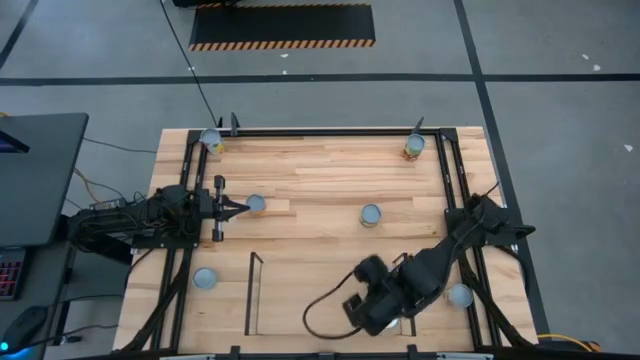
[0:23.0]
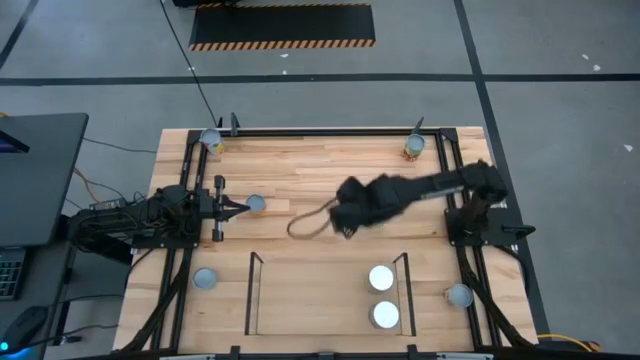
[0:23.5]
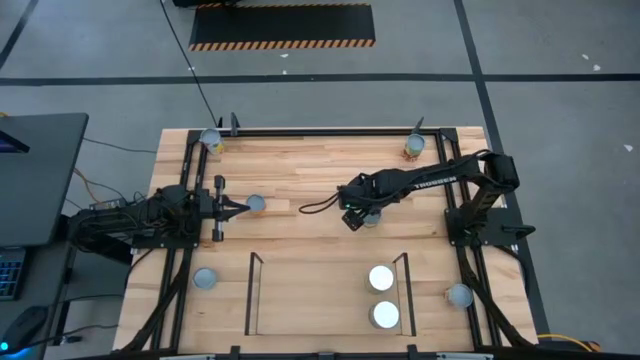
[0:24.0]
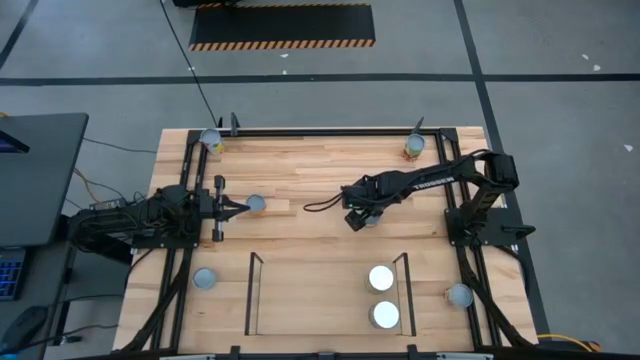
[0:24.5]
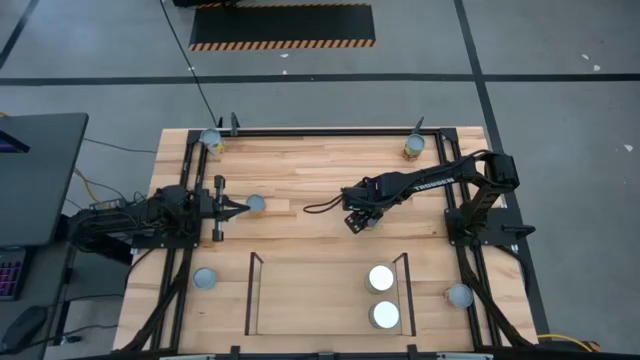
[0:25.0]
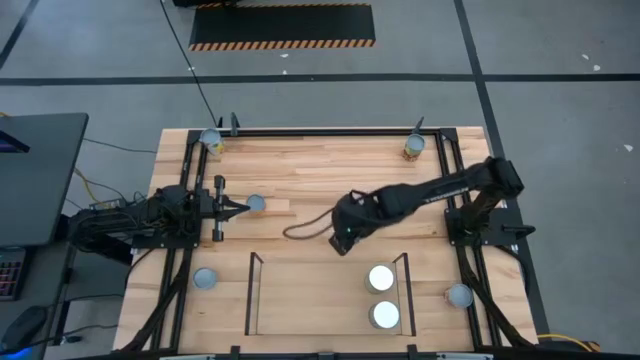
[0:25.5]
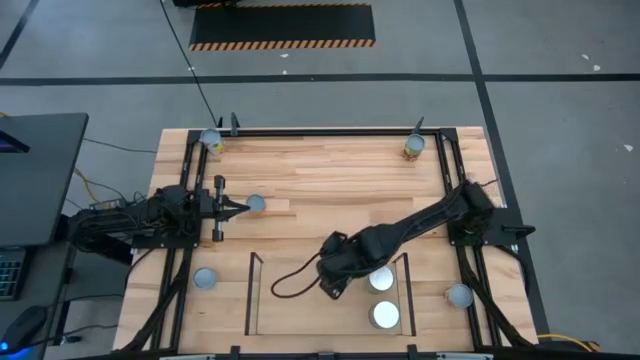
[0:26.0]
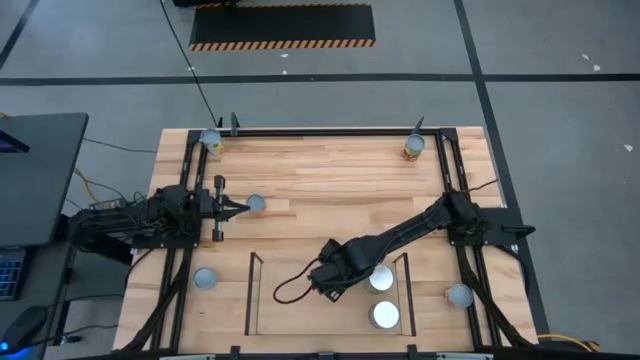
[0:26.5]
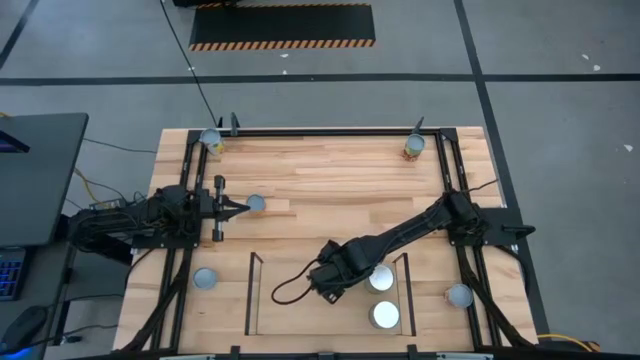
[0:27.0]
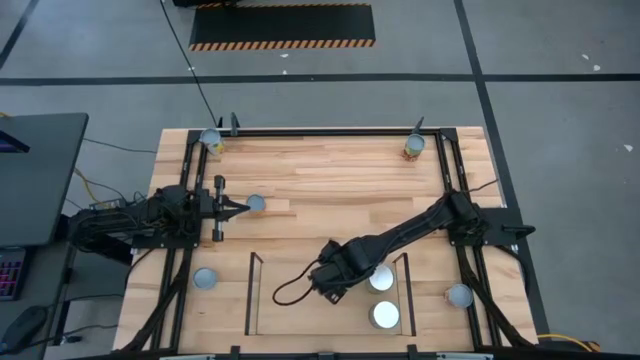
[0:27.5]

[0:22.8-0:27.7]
Task: Pick and place cans onto a shelf
Put the canned peaches on the shelf

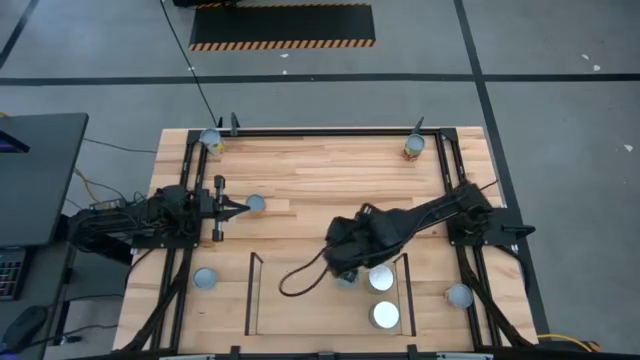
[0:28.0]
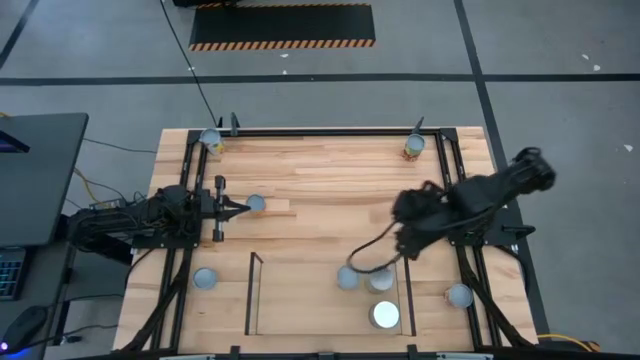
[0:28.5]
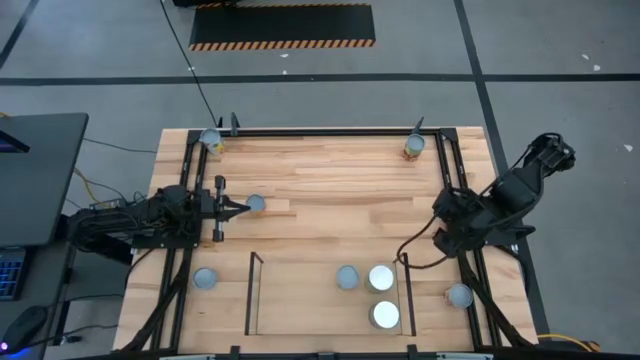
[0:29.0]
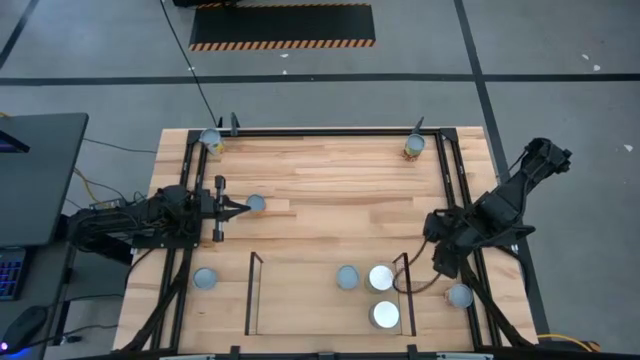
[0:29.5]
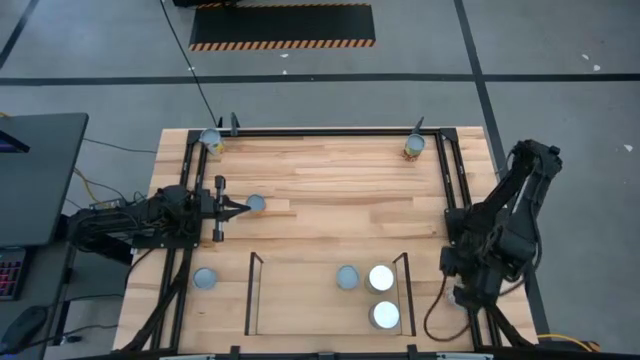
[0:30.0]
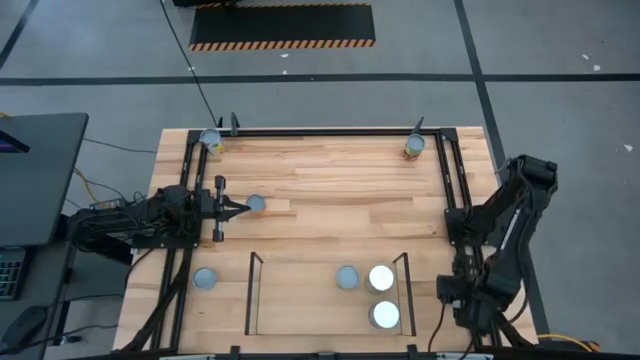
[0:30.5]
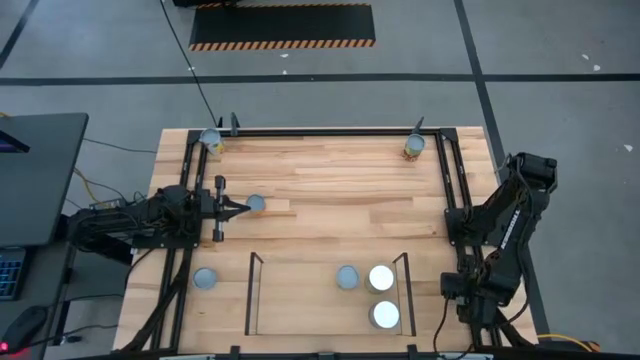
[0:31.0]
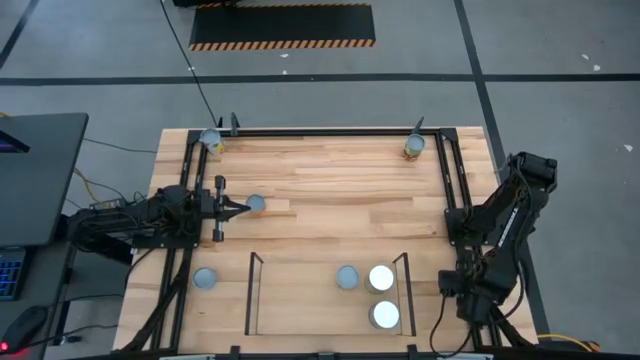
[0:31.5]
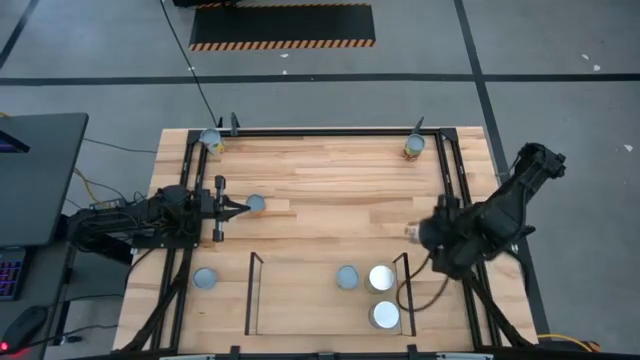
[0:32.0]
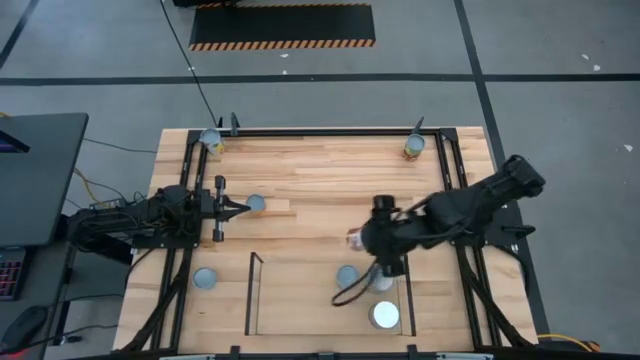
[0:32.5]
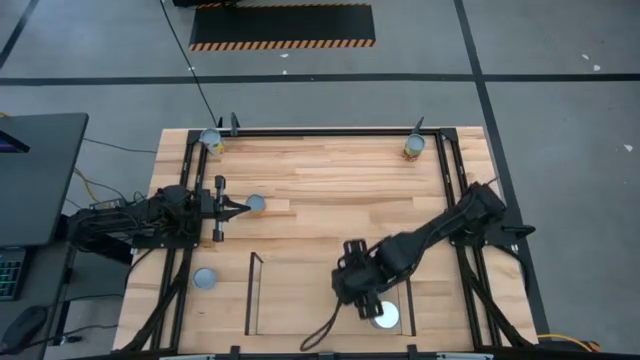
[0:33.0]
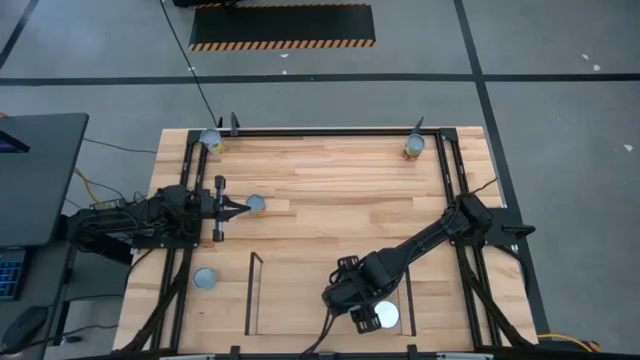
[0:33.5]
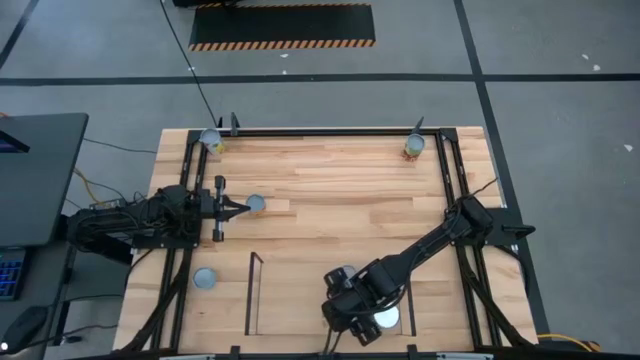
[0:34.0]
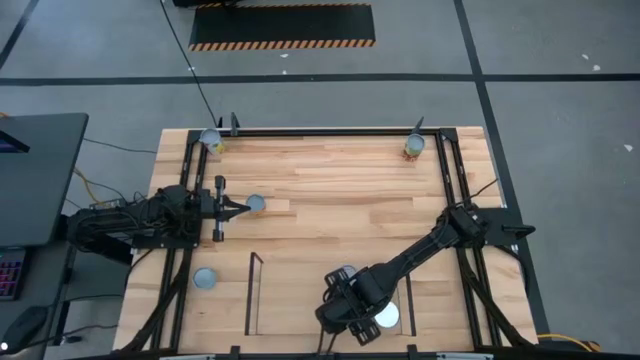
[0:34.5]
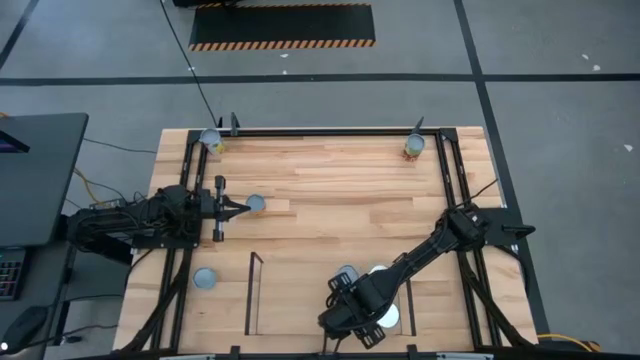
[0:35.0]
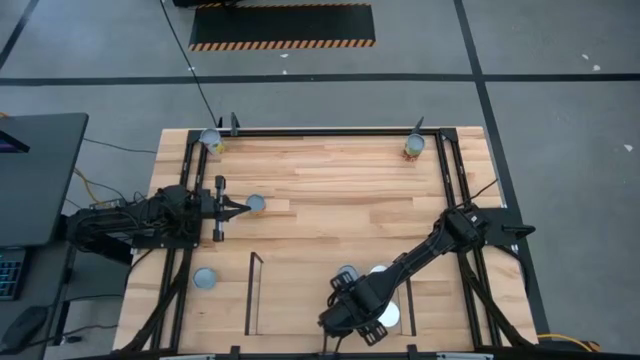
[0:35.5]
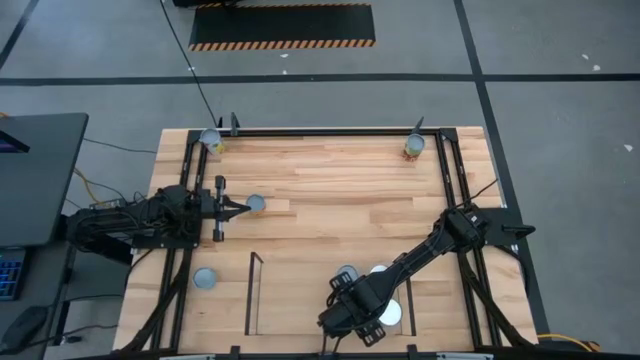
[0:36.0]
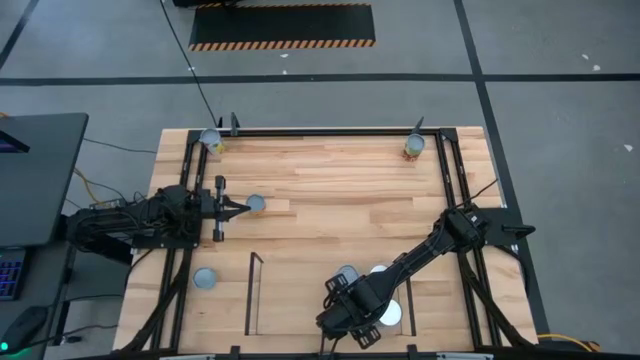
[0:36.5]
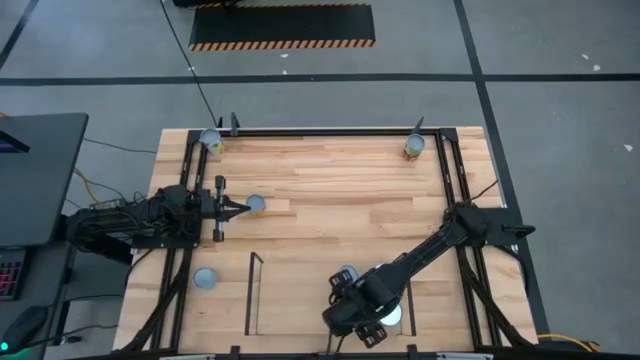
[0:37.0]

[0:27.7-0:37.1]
Put the canned tomatoes on the shelf

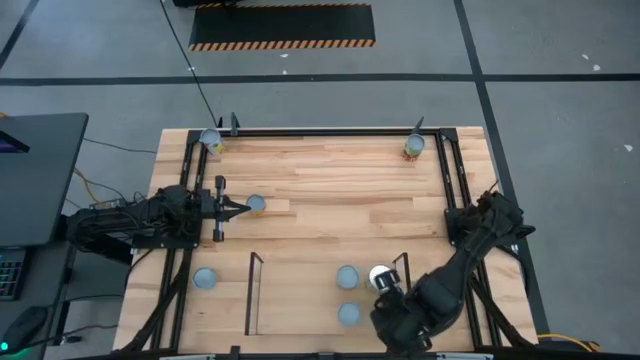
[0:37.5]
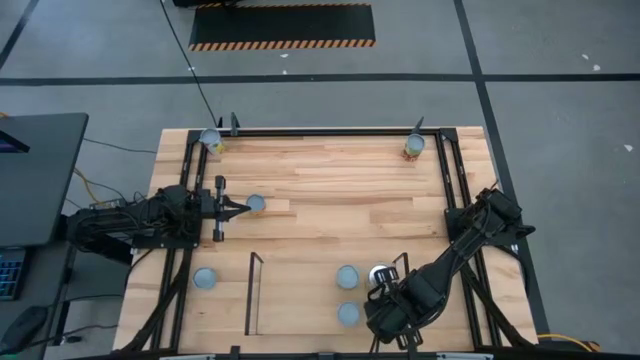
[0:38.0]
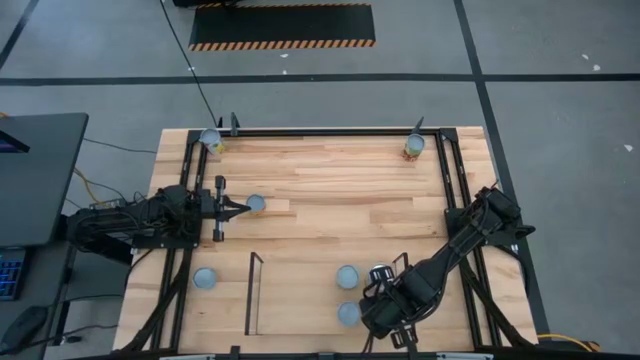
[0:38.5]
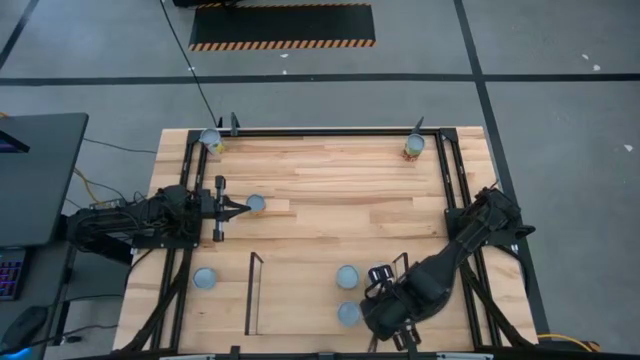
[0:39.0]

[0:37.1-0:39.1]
Adjust the canned peas on the shelf

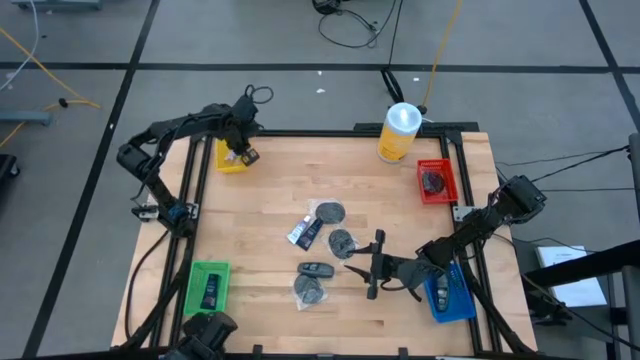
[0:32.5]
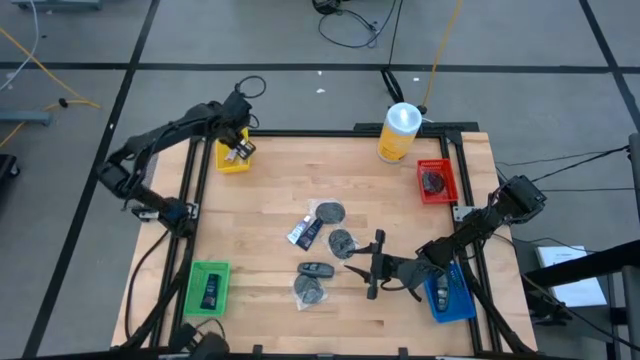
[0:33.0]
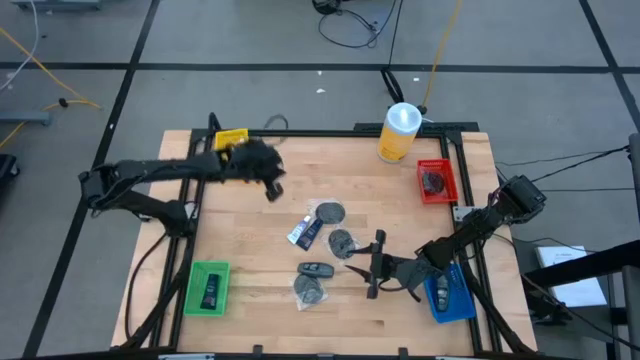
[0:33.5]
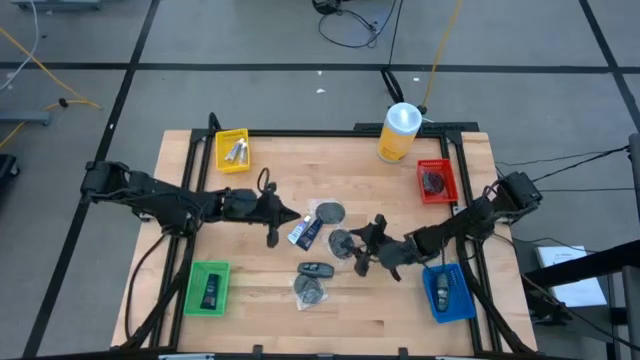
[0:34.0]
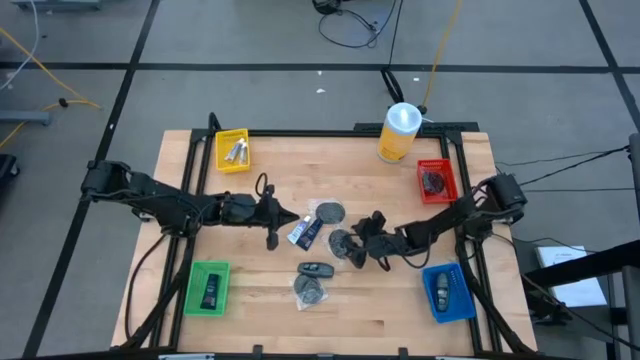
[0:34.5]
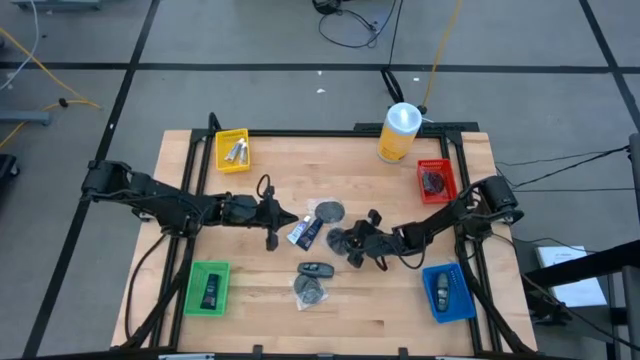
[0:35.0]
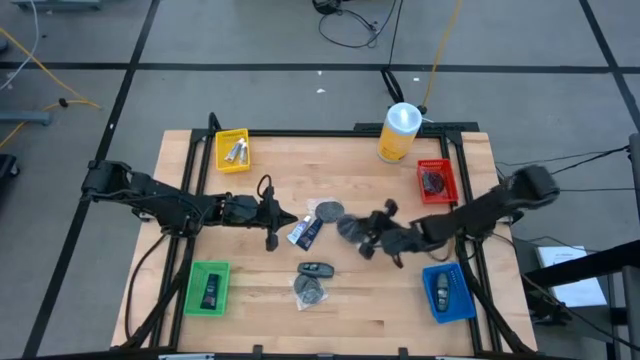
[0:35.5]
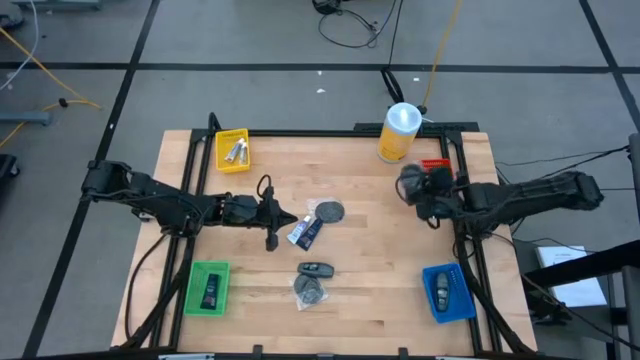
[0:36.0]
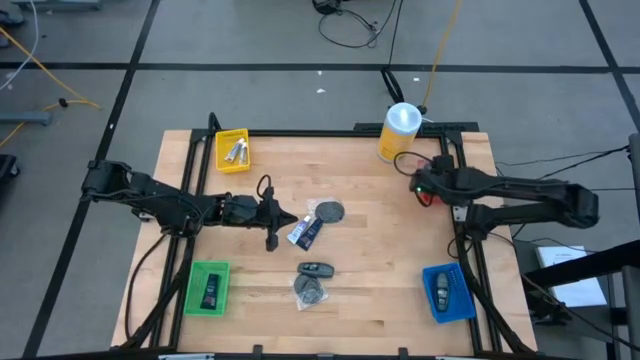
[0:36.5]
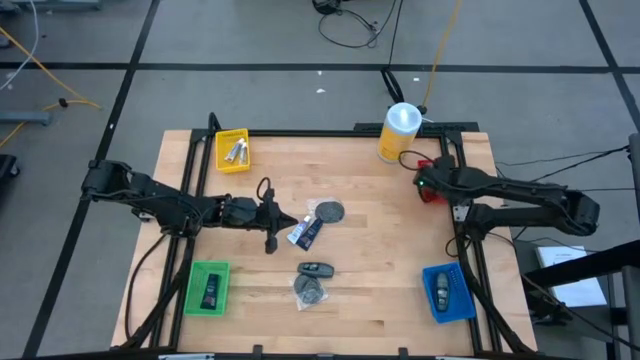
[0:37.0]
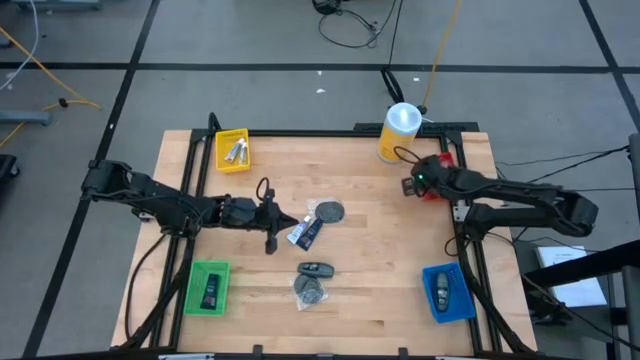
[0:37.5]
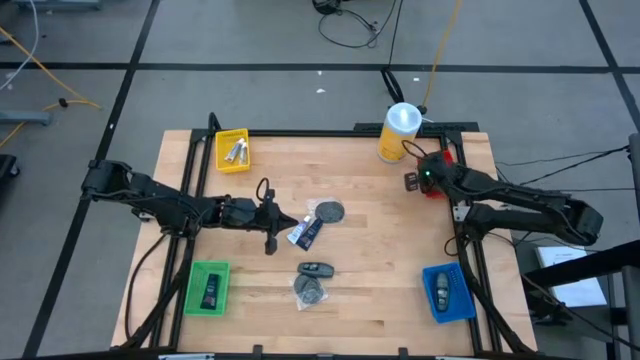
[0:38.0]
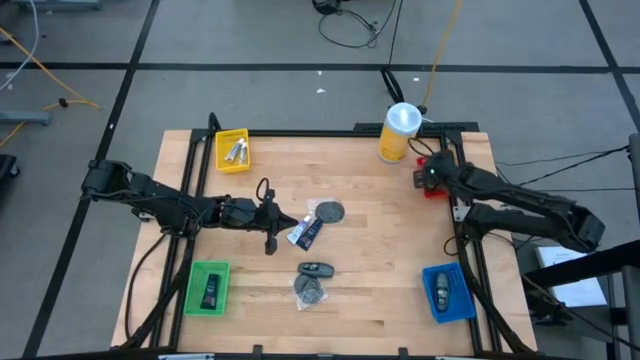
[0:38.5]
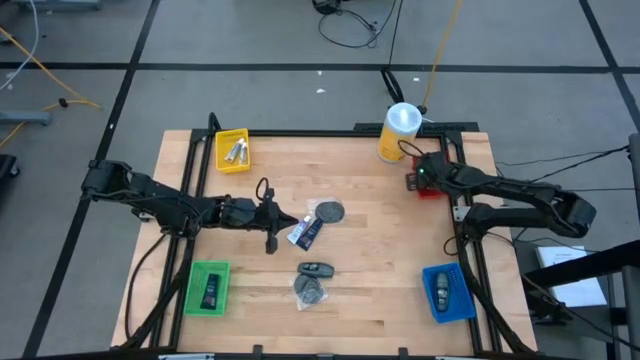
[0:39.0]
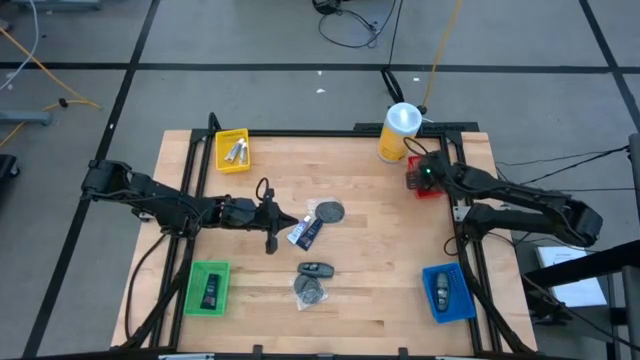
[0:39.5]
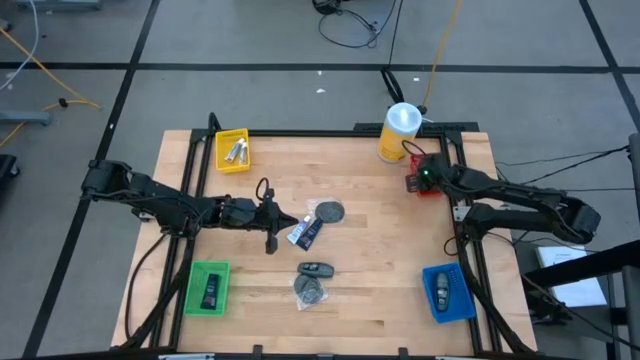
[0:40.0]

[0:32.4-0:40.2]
Task: Pick & Place Travel size toiletries
Put the middle black hairbrush into the red bin
